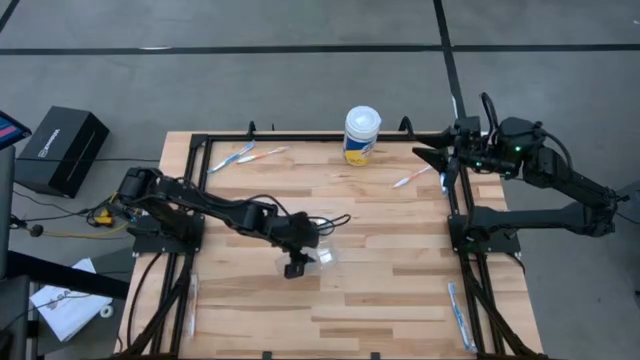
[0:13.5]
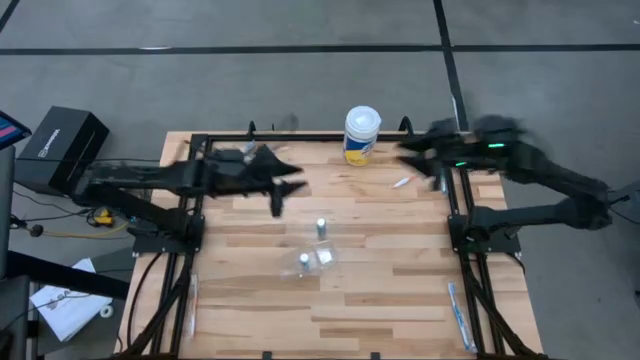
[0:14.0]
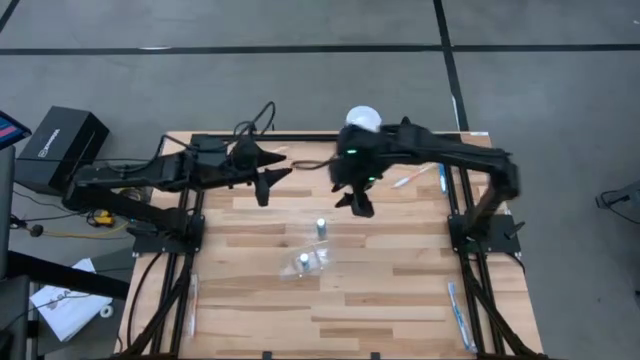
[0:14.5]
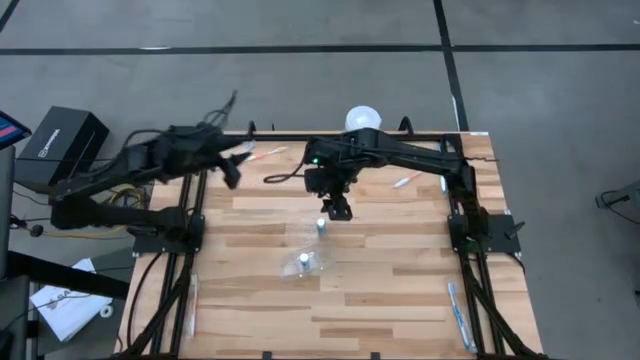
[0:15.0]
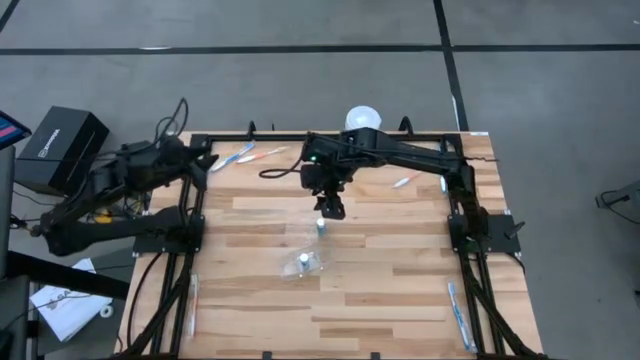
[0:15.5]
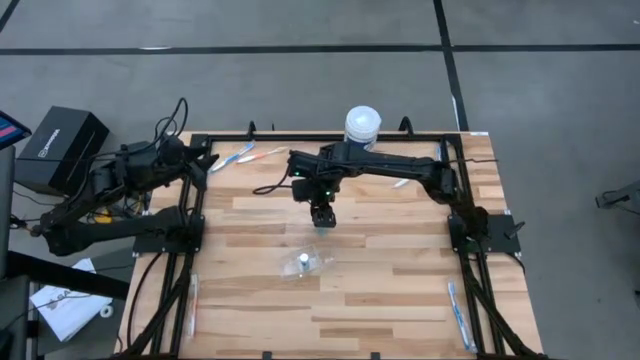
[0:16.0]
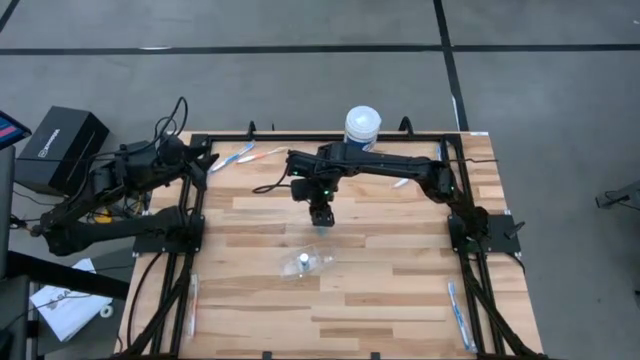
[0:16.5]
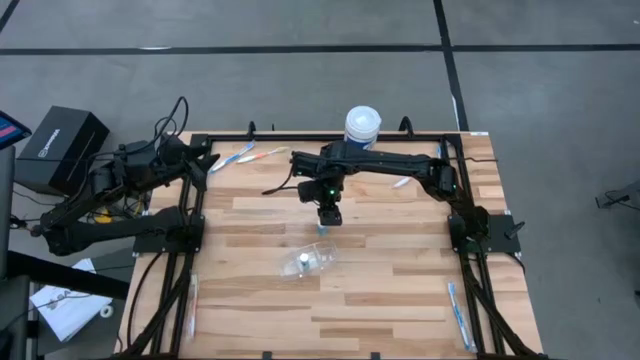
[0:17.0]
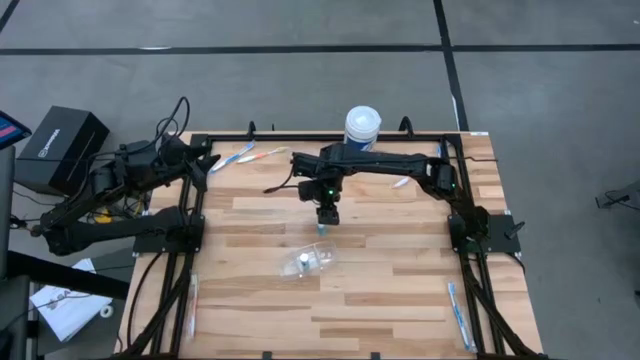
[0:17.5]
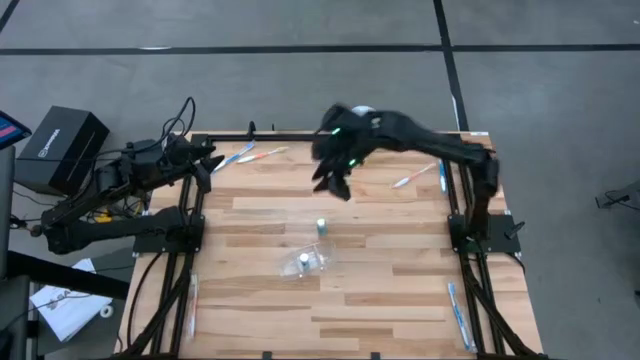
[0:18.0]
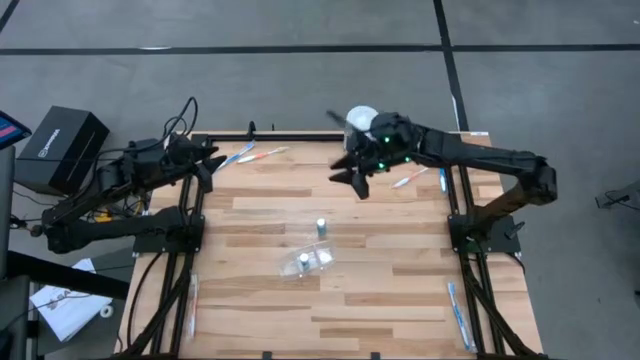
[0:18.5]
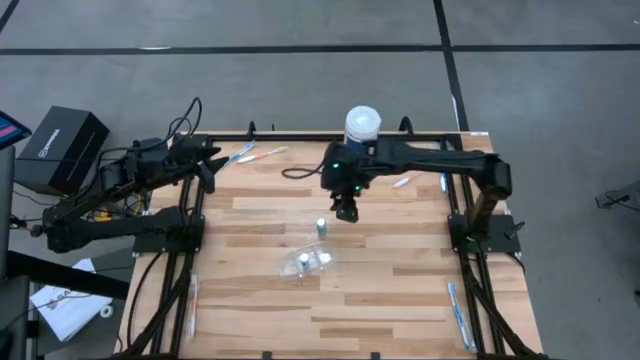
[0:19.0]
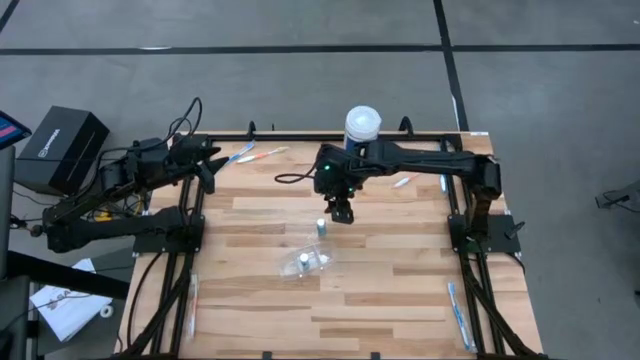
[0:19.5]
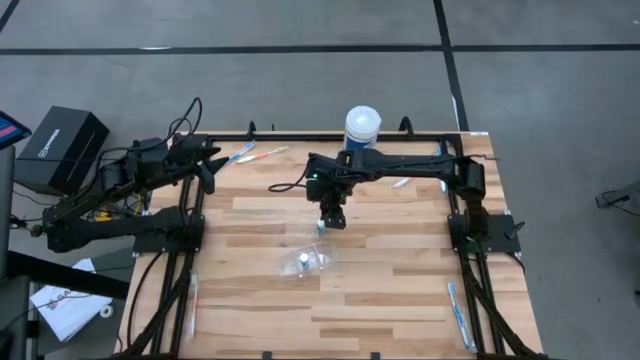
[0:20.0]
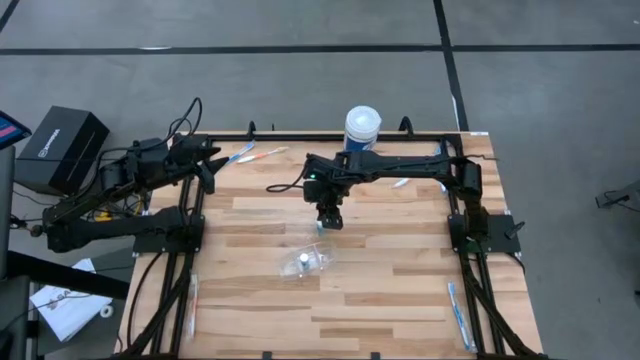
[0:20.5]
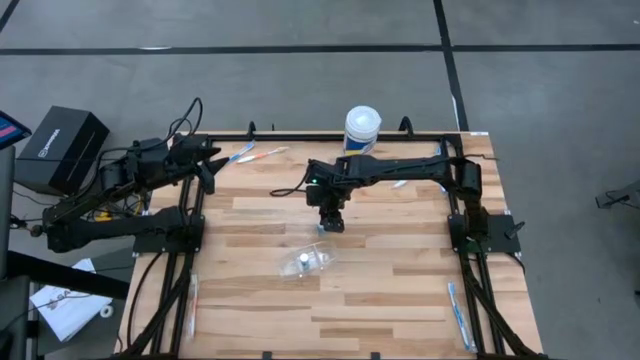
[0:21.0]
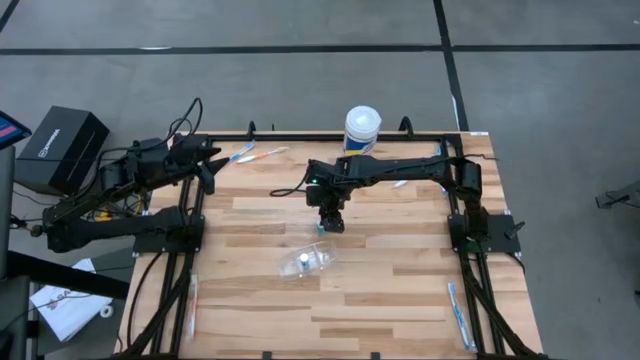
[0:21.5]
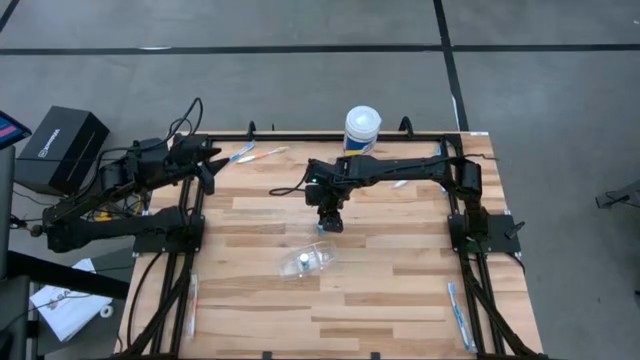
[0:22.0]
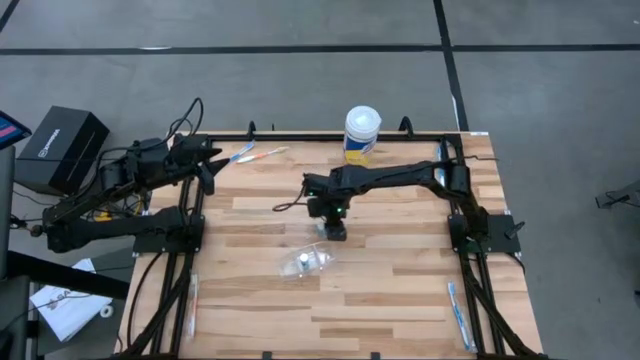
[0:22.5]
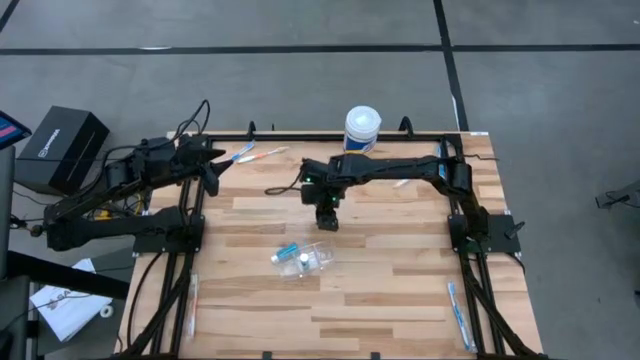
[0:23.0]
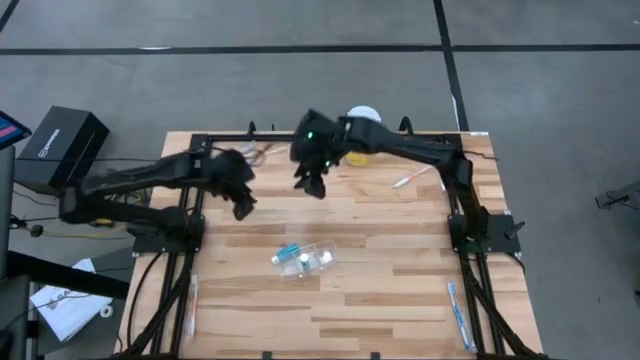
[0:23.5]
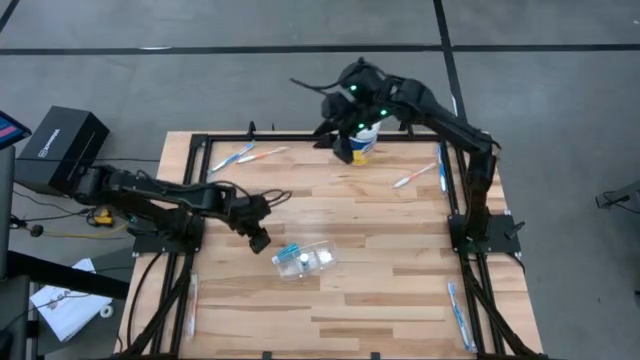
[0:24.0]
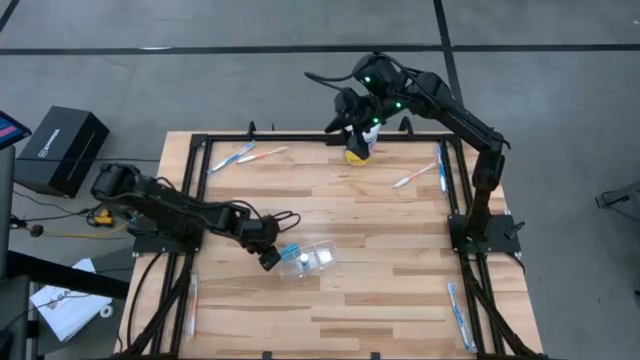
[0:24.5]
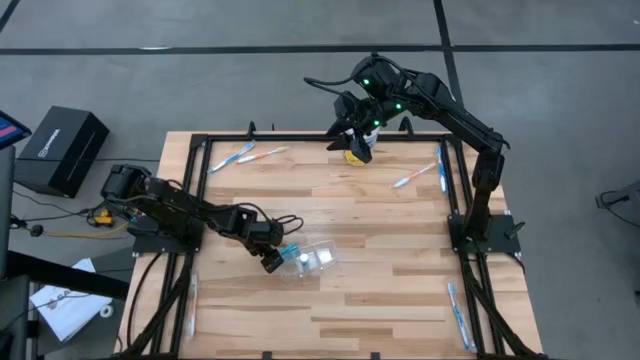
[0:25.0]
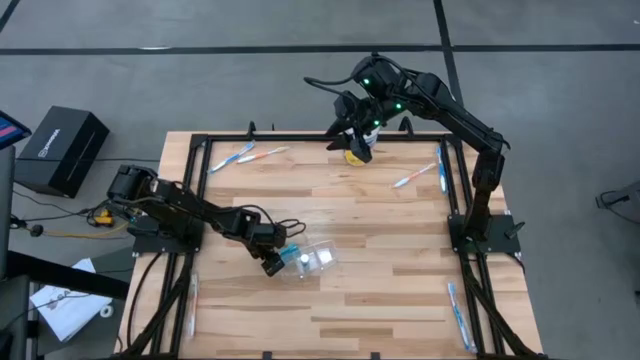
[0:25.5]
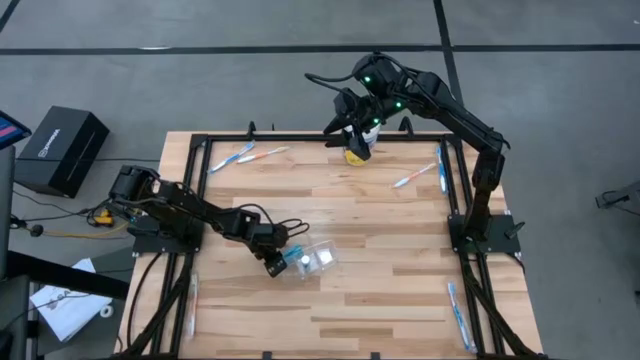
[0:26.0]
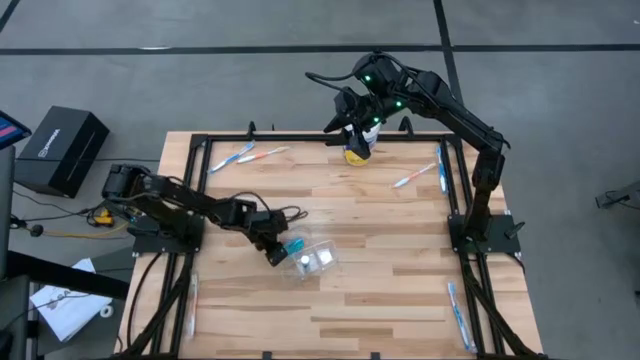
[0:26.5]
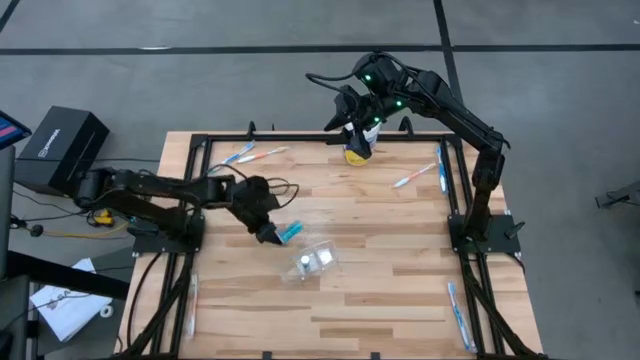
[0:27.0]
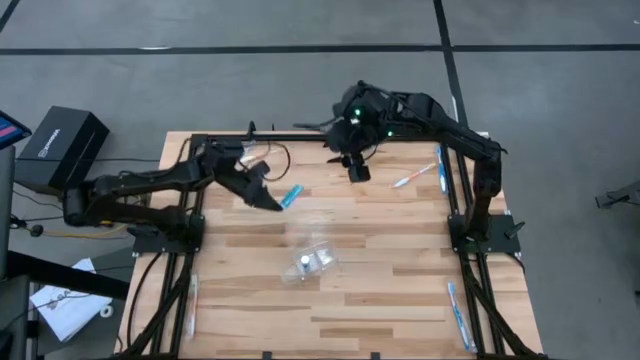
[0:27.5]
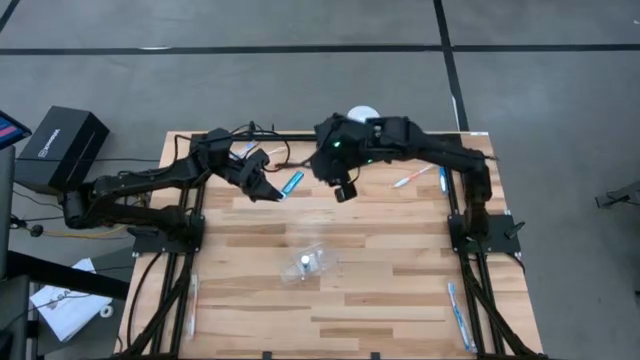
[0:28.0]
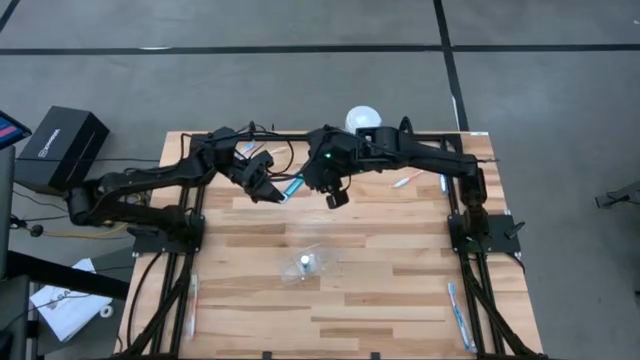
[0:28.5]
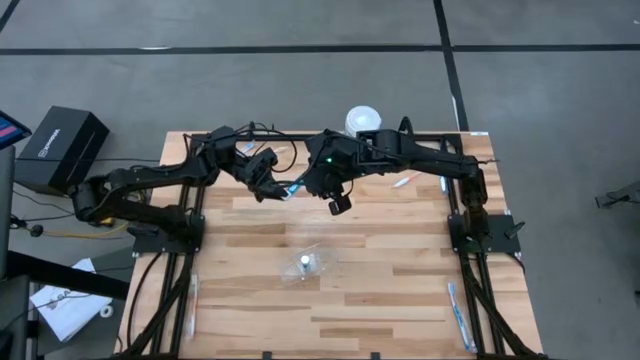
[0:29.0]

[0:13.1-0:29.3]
Task: Pick & Place toothbrushing station
Put the blue mouthwash into the transparent organizer
